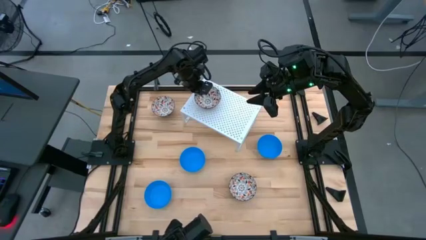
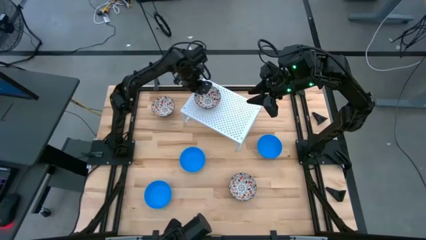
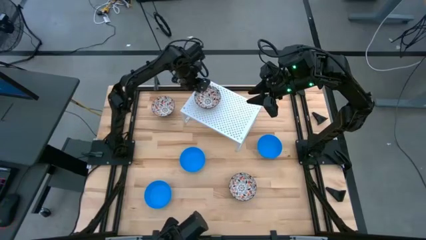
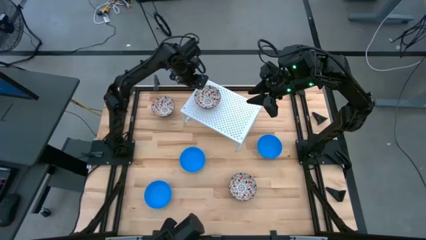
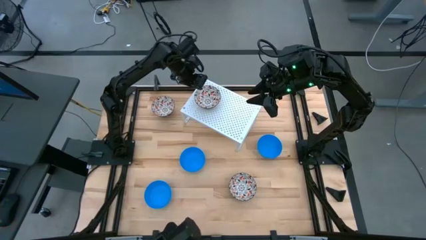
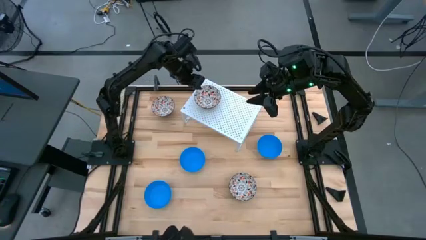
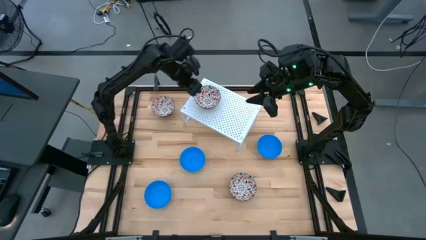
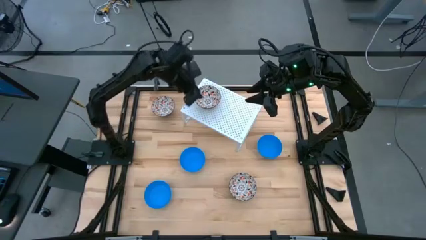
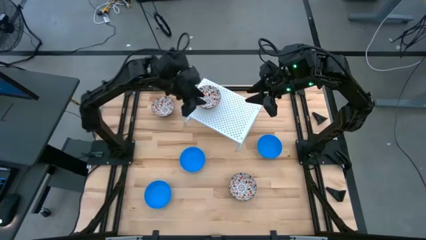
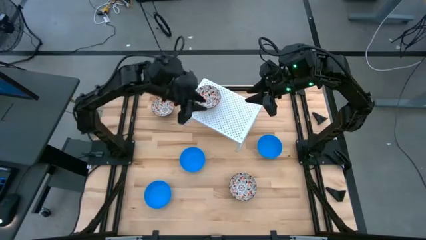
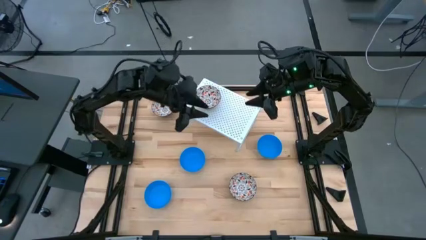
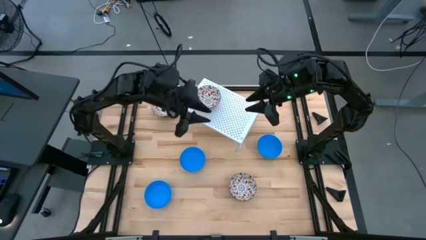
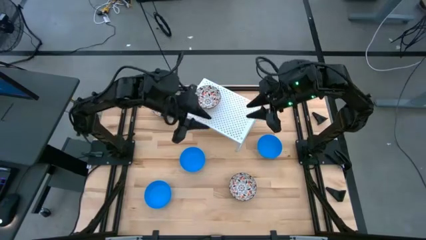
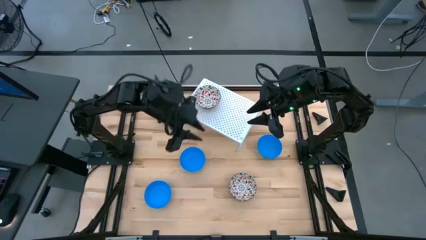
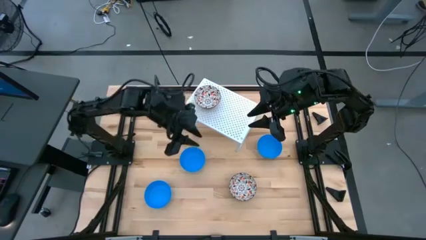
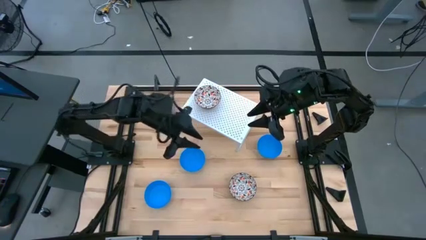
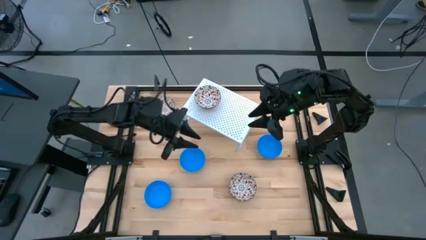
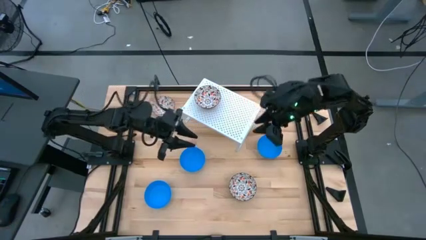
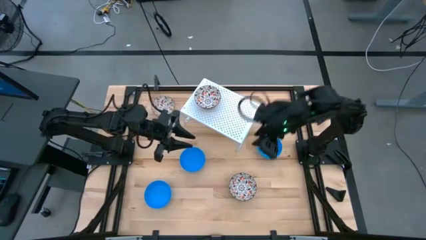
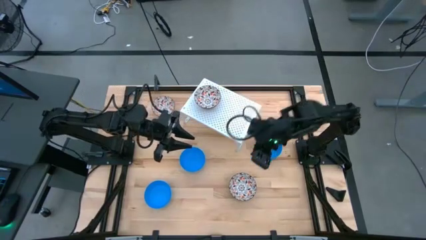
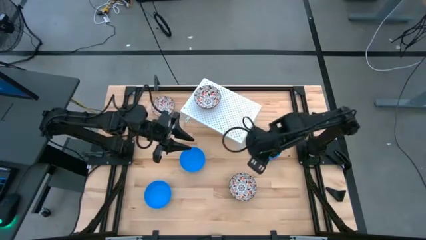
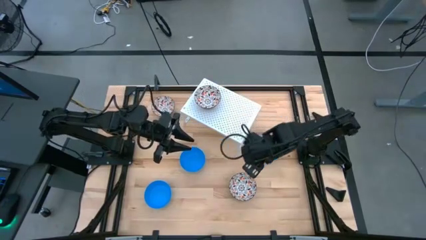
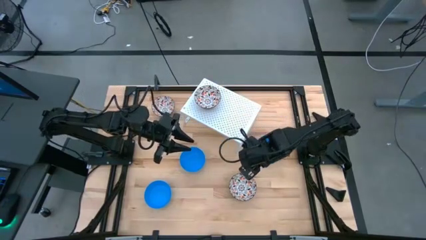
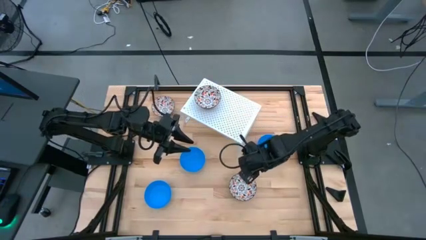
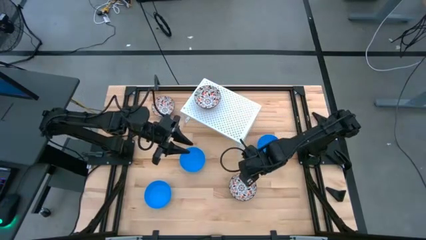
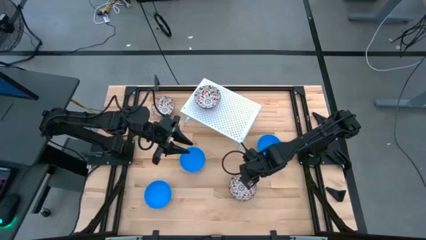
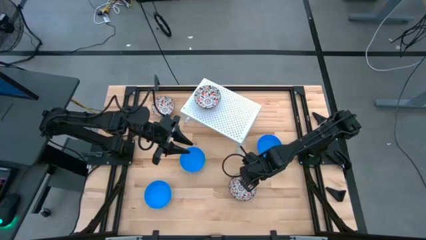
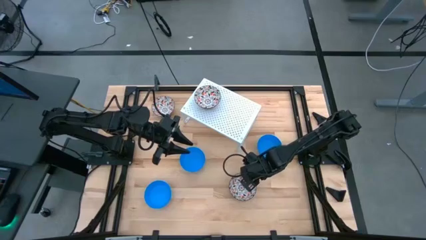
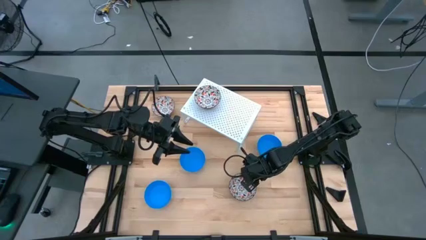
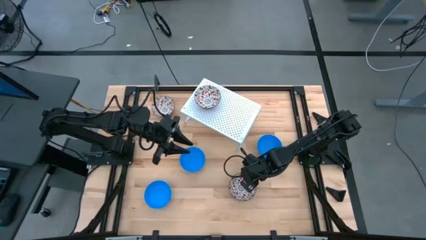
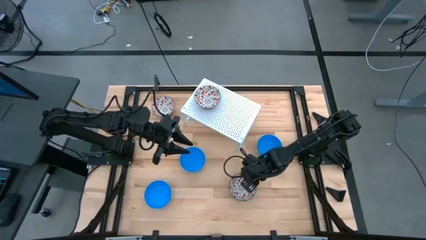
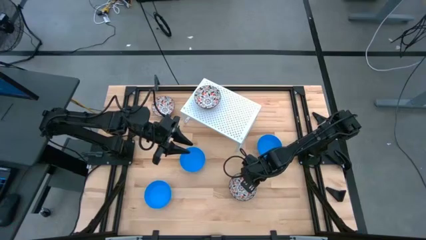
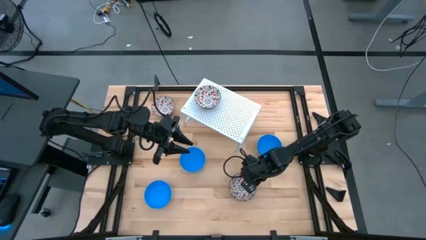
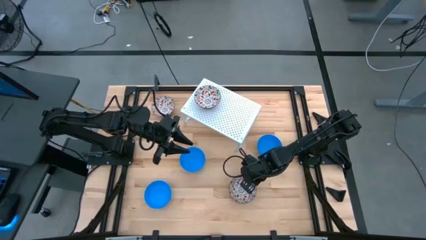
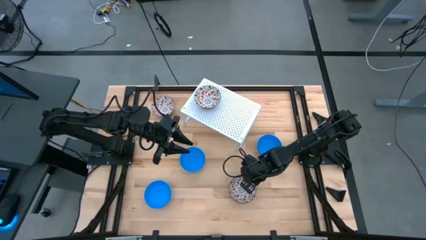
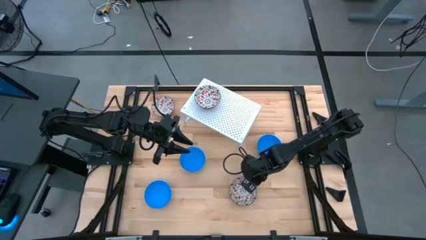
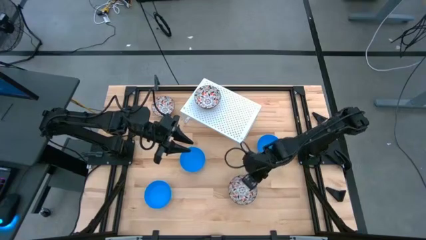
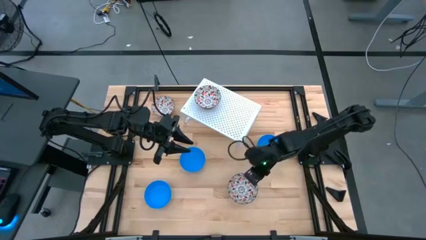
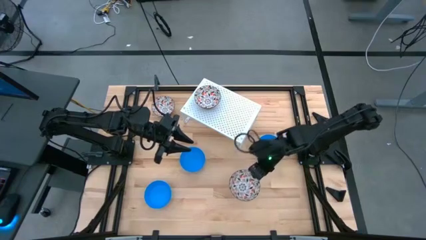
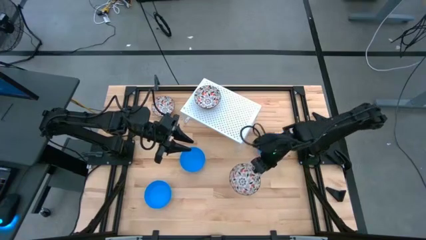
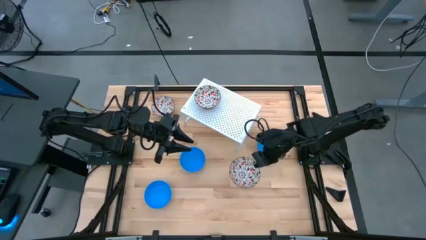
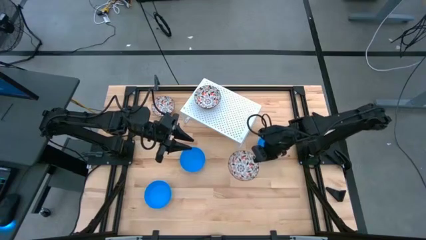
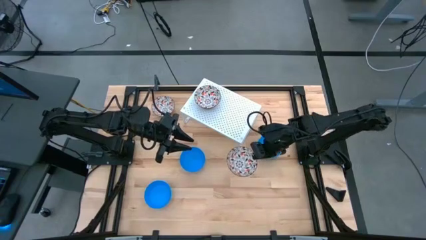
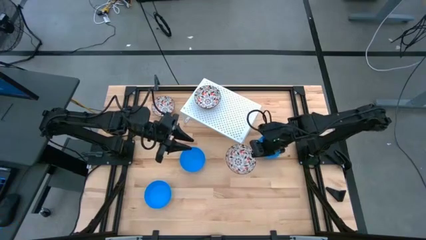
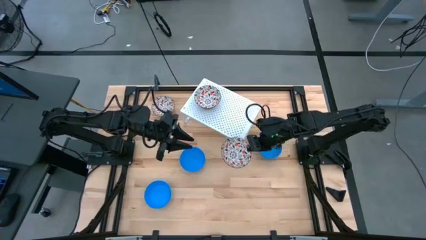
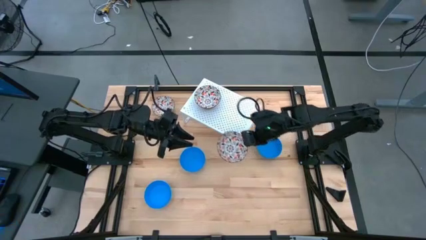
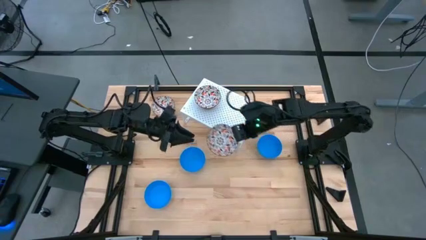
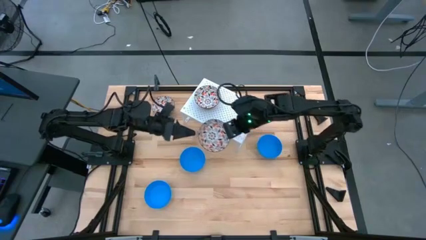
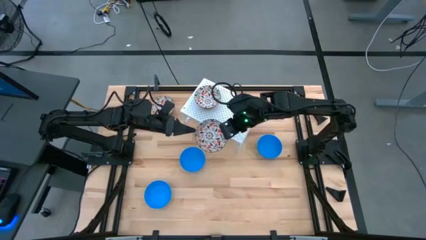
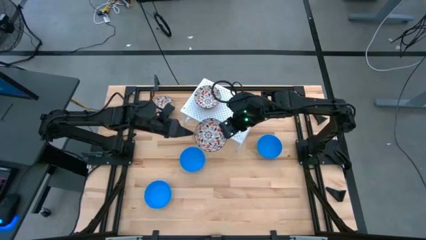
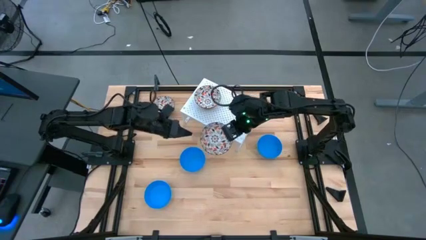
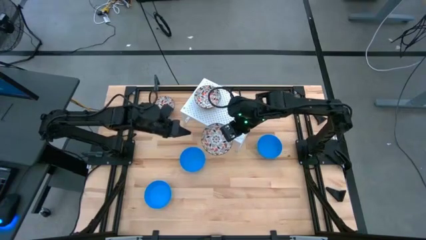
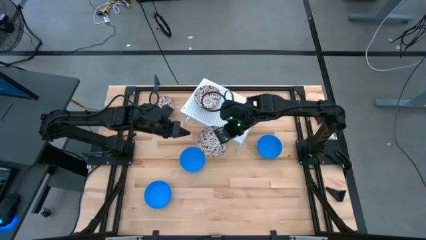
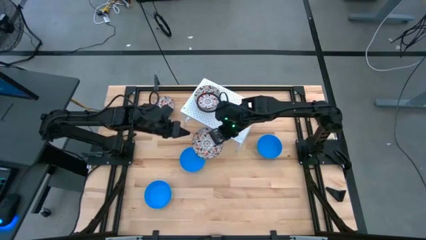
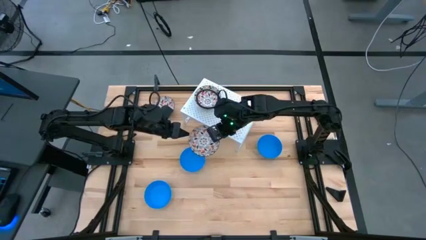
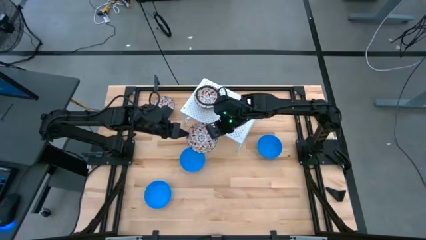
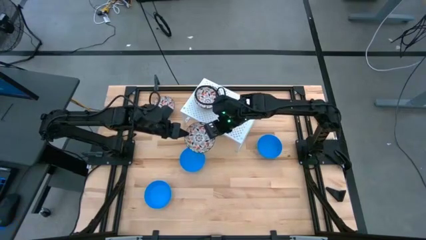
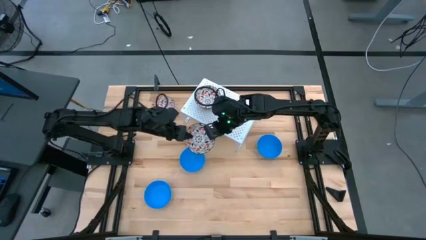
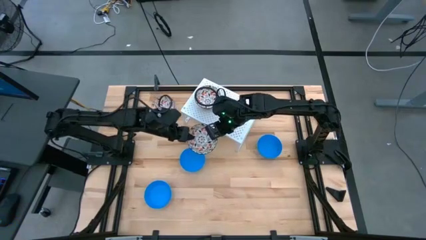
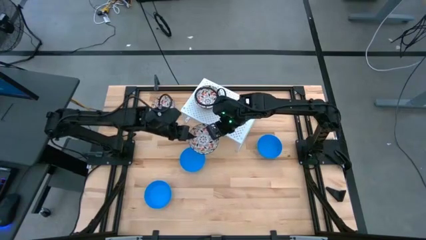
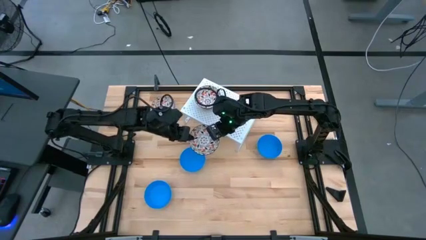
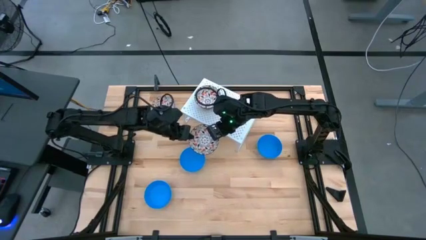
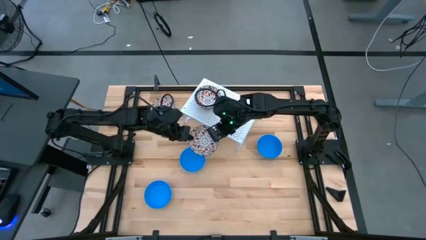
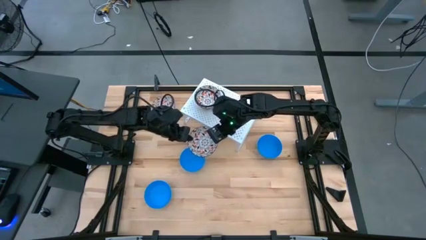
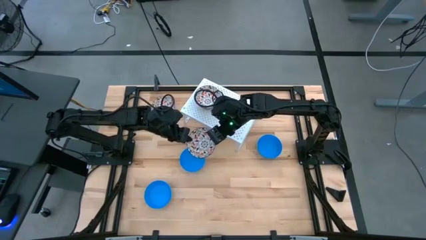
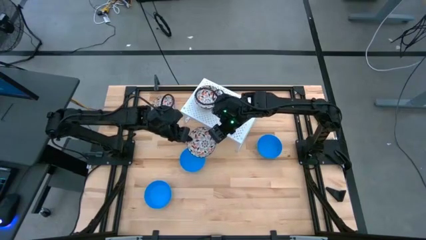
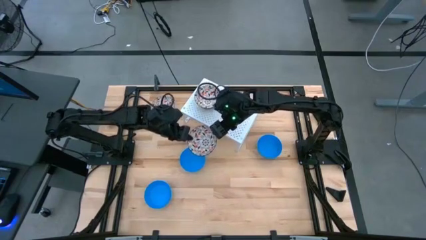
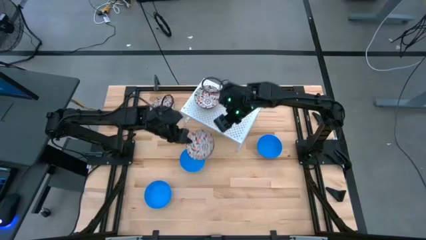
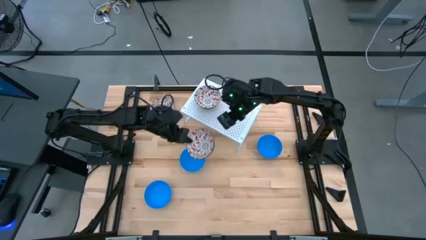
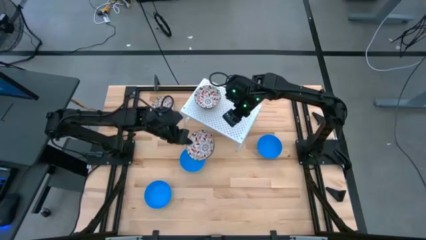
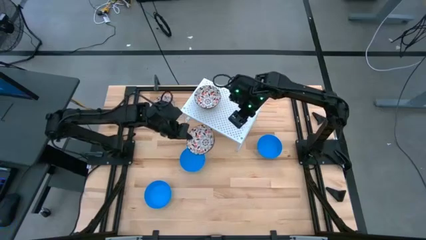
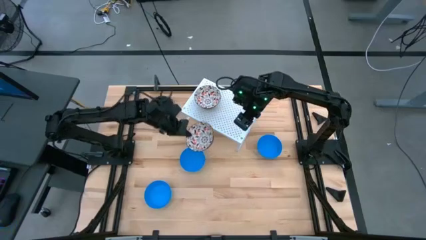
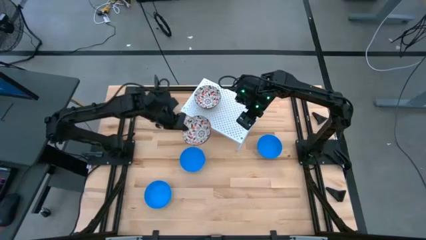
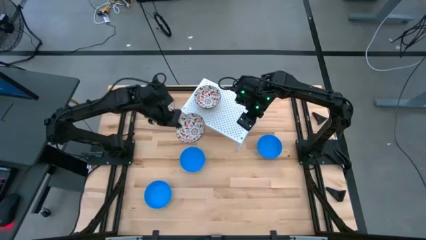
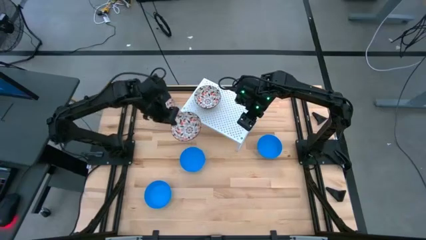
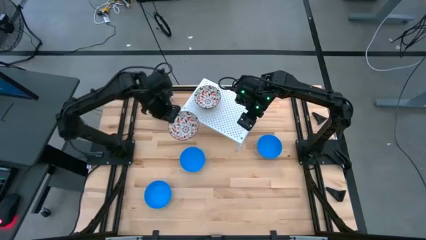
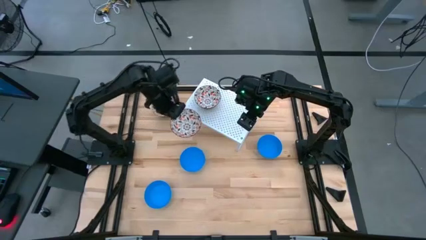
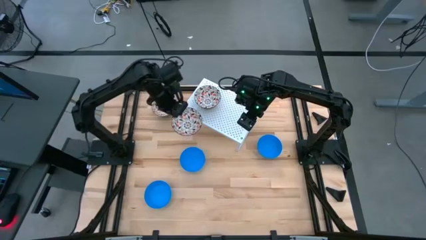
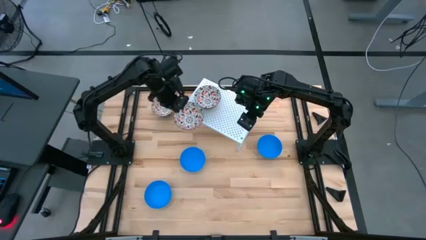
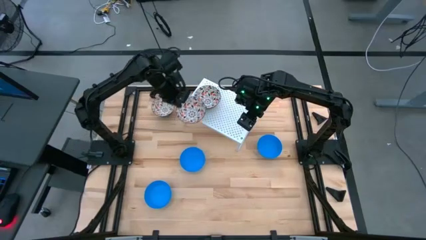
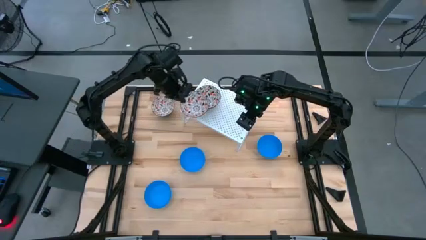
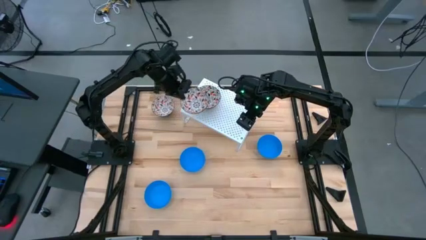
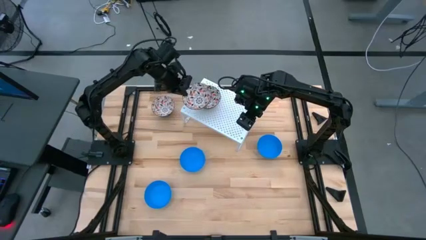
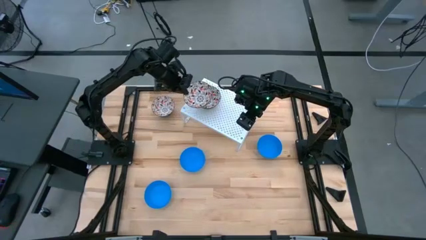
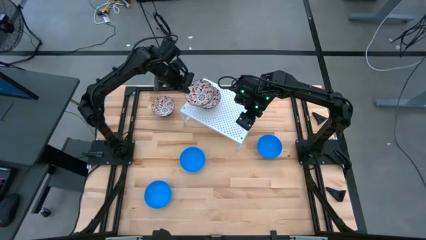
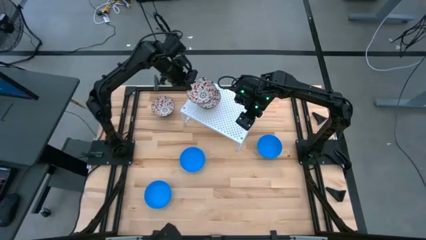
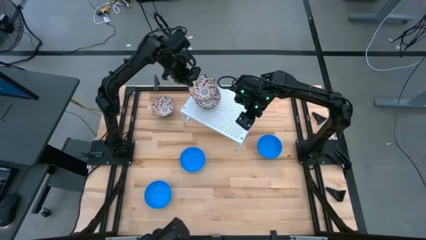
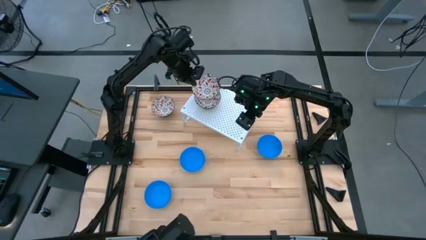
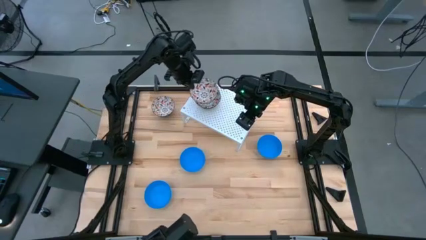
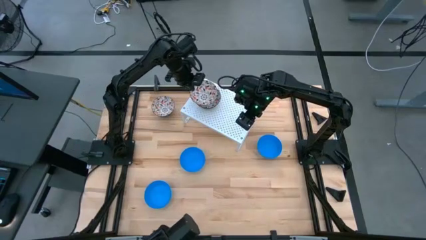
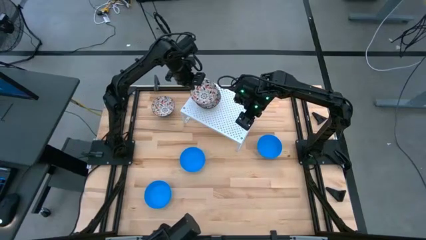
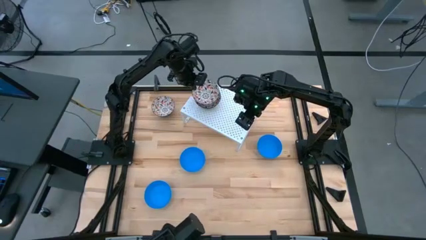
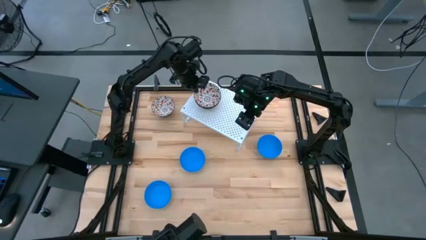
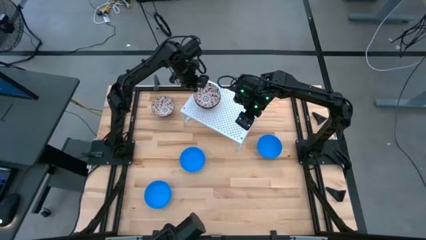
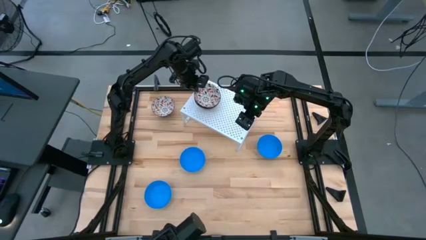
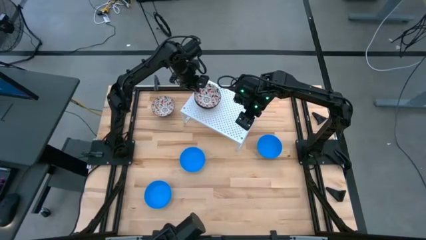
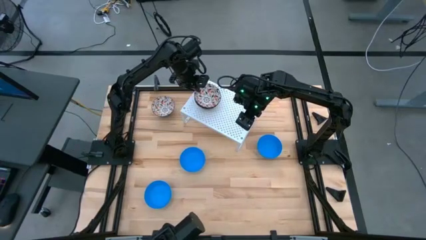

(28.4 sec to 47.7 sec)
Task: Pick & Place Mini bowls
Stack the bottom white patterned bowl on top of the other white patterned bowl on the shelf
